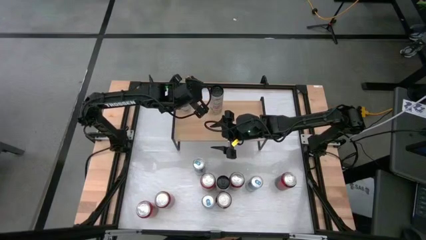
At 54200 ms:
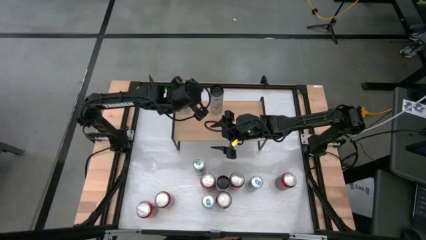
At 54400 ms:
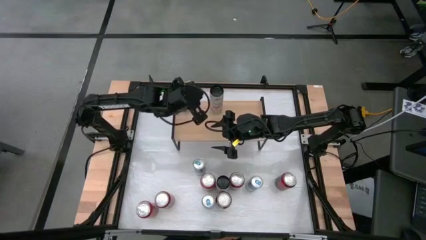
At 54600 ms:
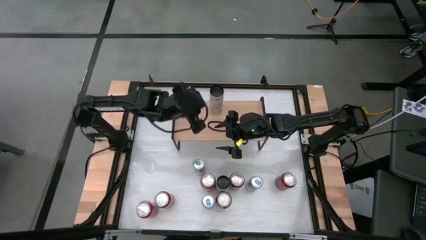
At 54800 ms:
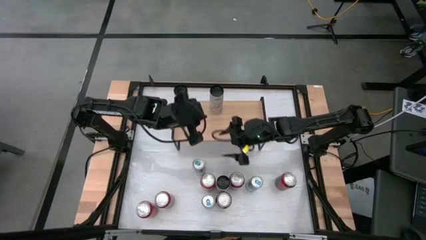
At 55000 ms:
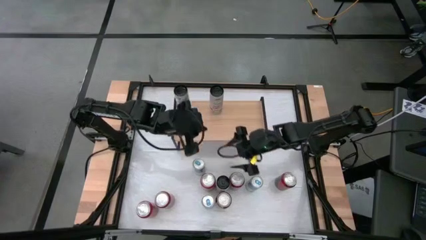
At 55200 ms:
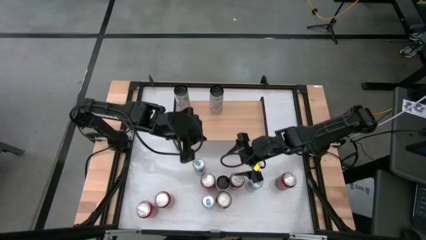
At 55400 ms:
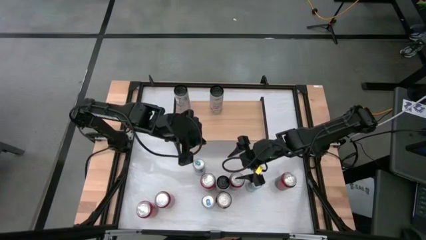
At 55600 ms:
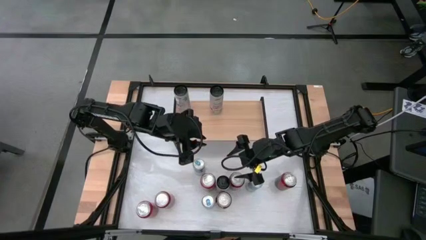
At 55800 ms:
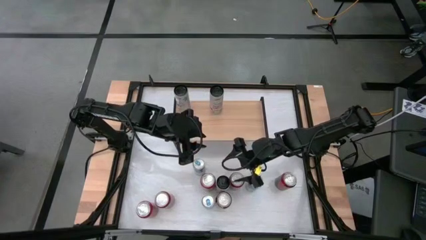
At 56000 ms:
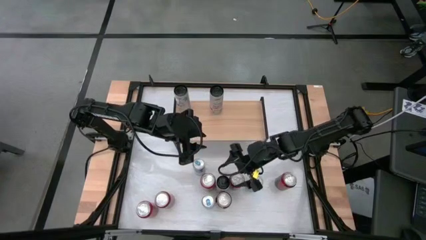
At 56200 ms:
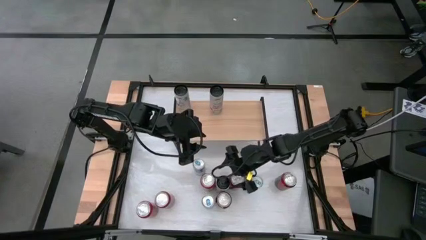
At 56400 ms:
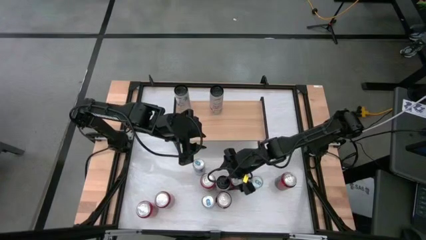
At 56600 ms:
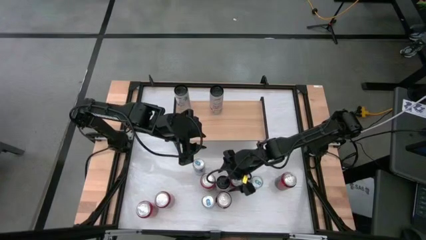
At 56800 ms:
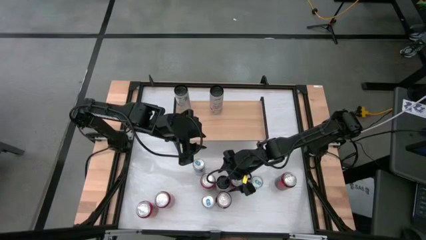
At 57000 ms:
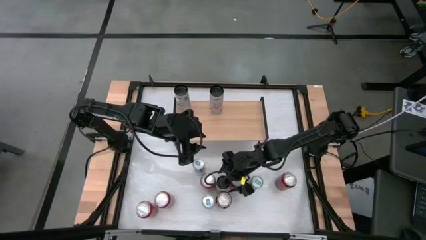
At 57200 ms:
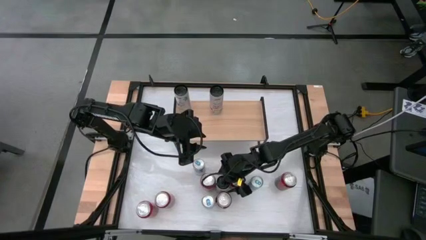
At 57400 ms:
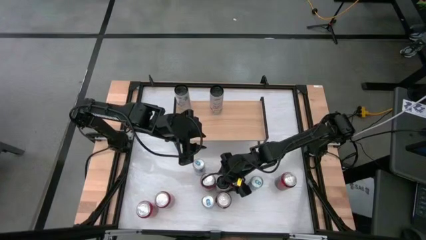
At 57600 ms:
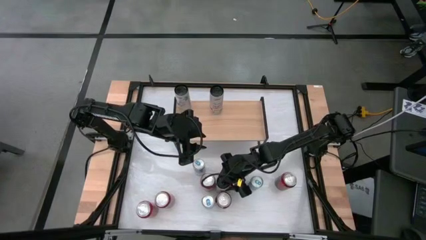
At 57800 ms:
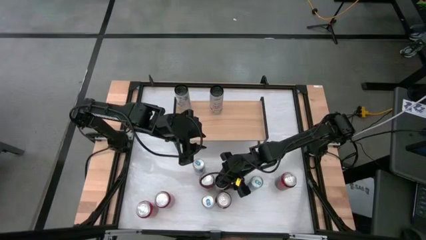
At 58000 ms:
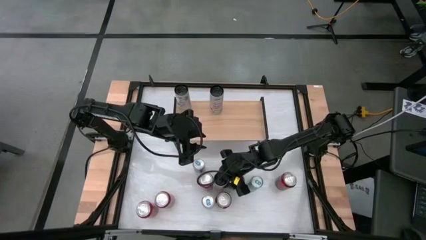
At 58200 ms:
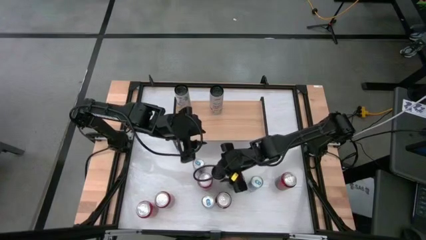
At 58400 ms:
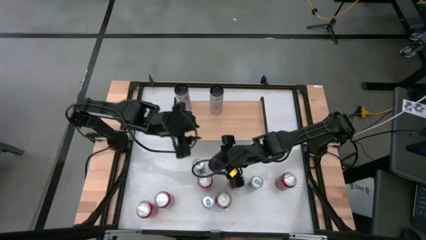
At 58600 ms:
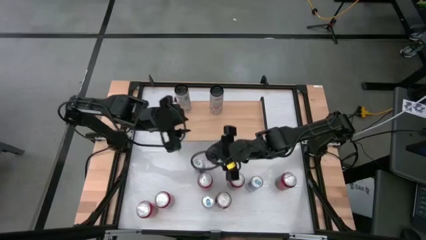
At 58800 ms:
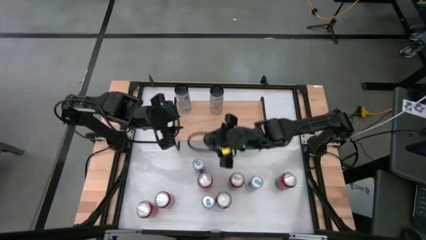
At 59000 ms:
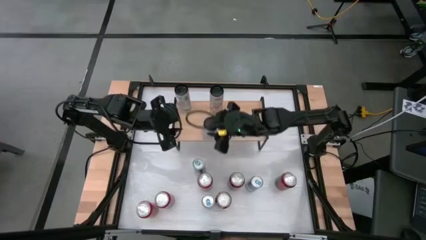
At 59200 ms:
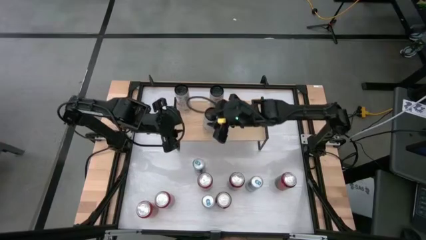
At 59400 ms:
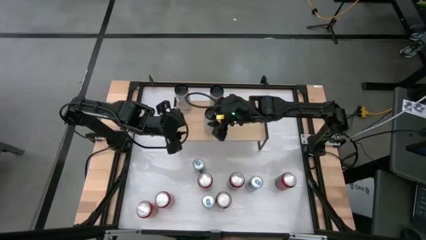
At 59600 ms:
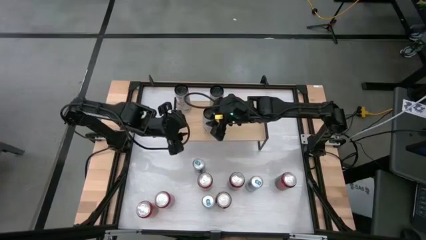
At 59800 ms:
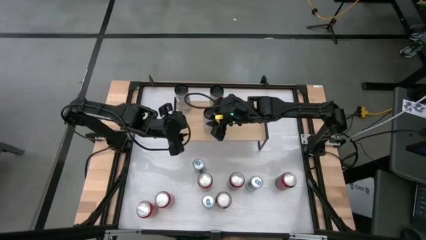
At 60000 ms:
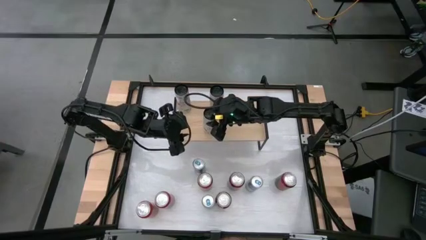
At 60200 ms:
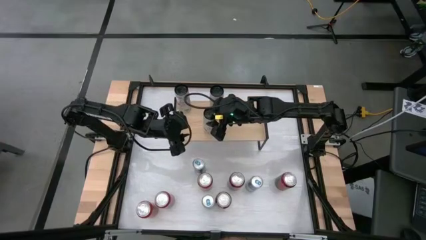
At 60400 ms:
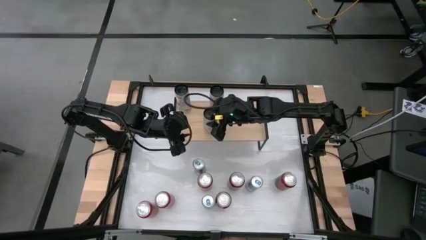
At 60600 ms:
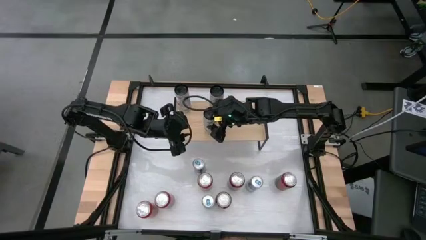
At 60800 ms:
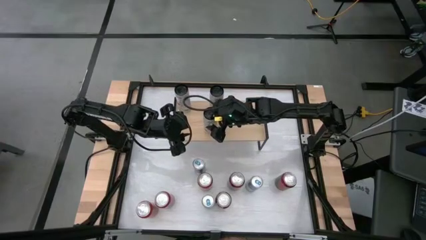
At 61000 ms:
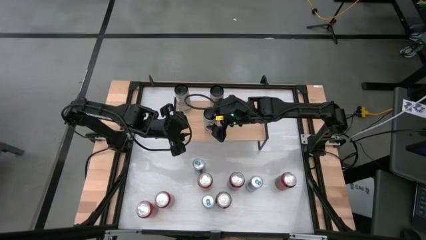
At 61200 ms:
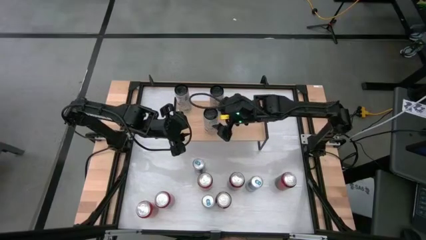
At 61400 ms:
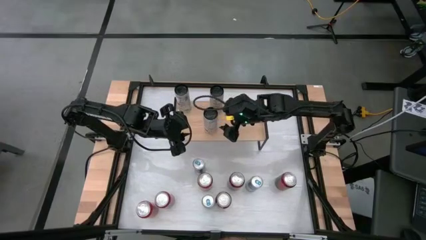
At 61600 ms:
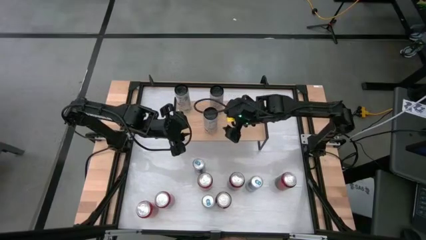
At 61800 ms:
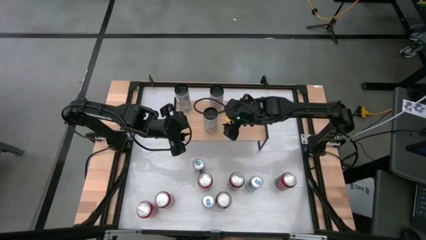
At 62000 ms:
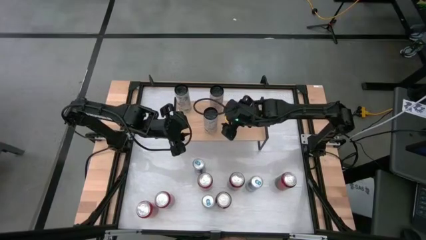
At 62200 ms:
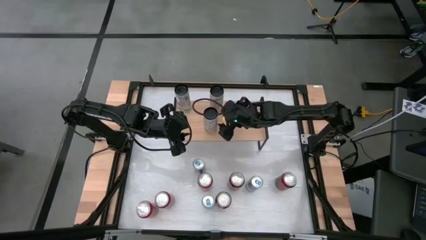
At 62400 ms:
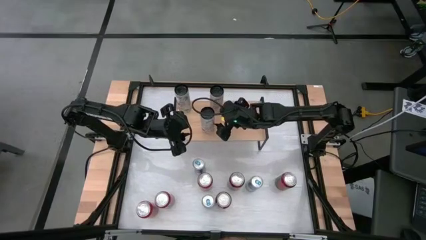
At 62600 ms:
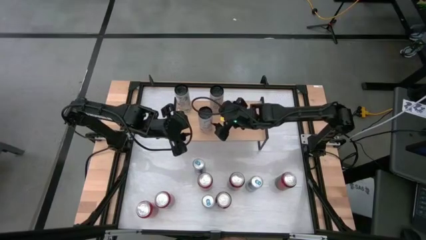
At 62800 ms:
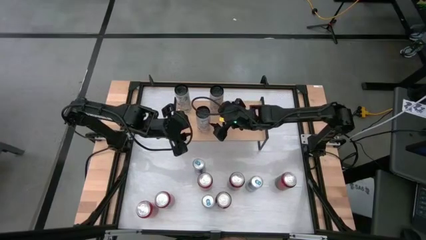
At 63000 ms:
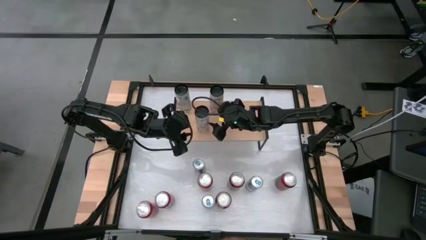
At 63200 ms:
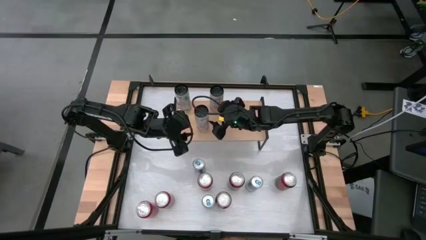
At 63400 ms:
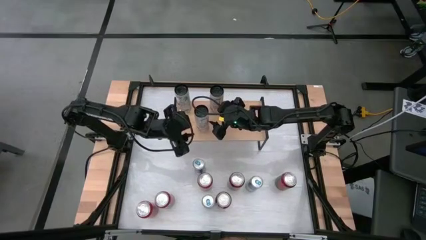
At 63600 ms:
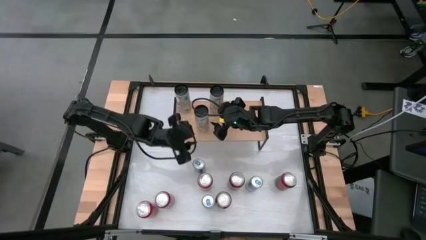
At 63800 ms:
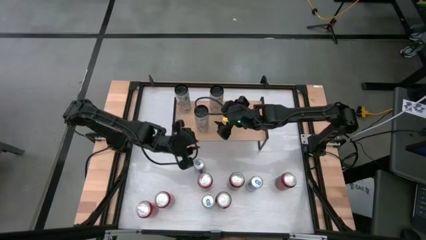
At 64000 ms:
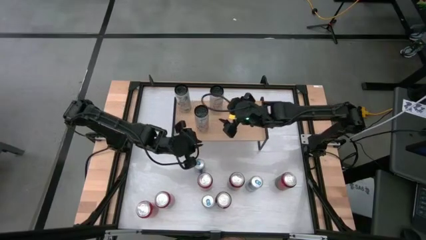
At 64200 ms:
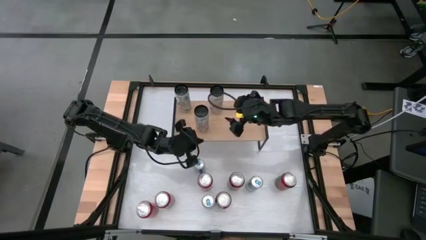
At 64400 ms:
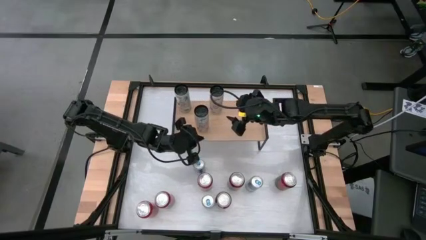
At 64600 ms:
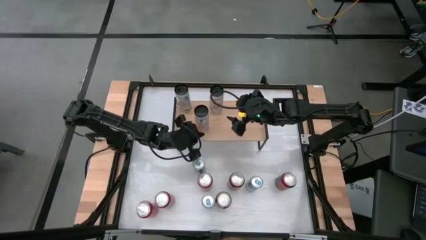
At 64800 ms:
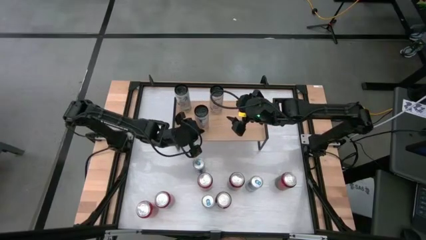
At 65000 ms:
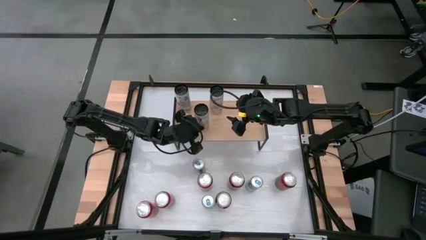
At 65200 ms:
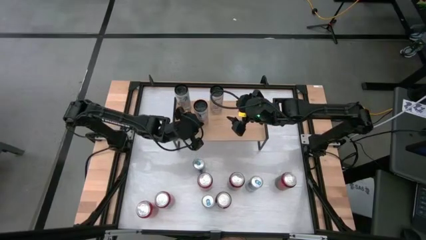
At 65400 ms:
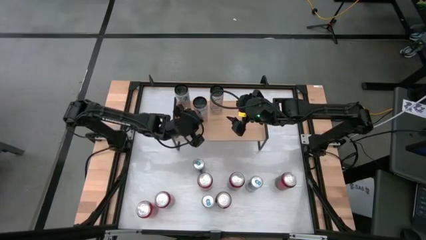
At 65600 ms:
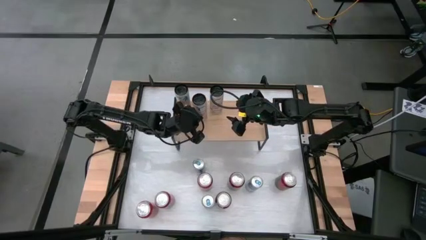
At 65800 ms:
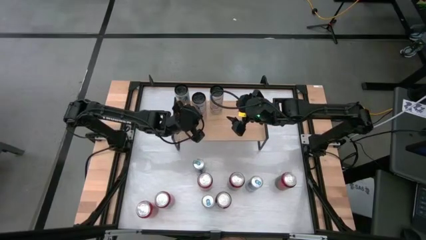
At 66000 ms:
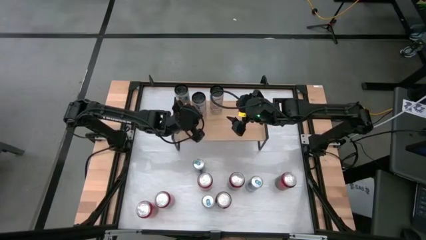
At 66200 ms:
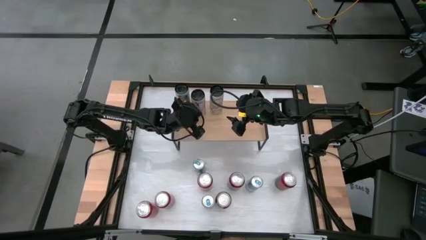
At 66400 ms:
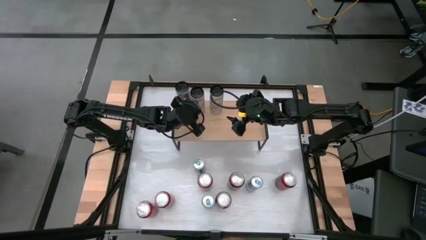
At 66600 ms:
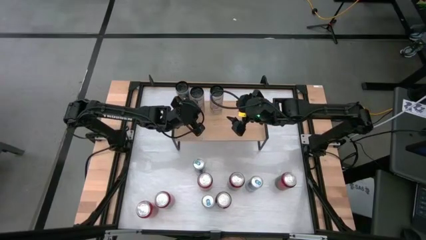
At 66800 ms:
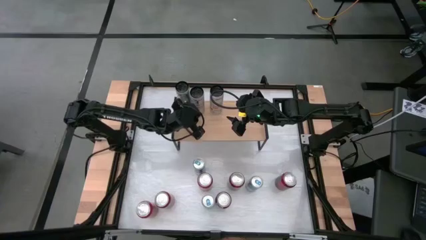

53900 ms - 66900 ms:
Task: Place canned beverage on shelf
Put the white soda can on the shelf

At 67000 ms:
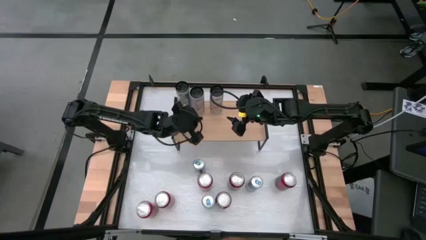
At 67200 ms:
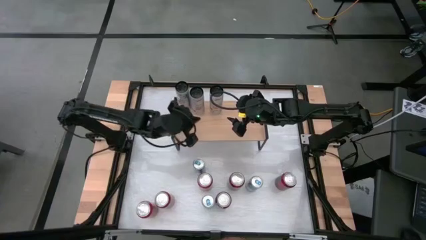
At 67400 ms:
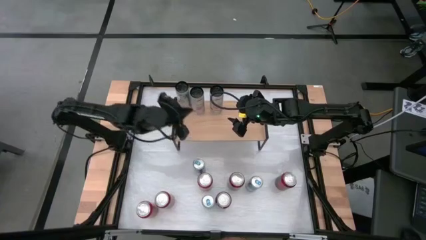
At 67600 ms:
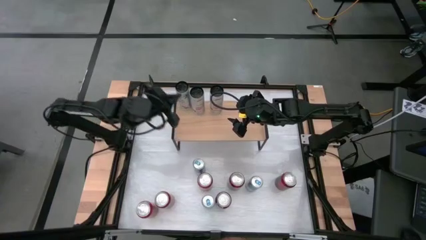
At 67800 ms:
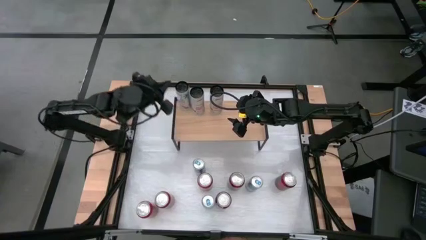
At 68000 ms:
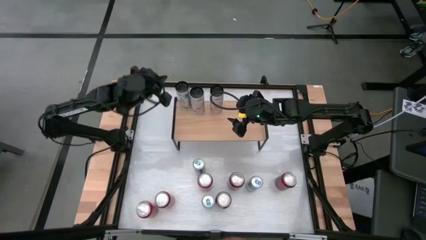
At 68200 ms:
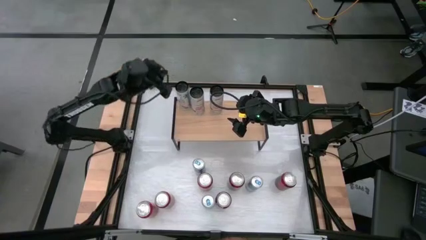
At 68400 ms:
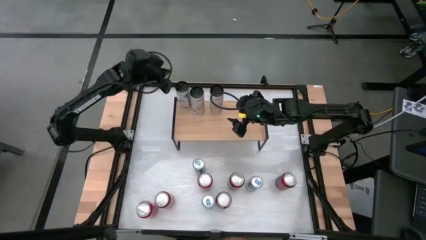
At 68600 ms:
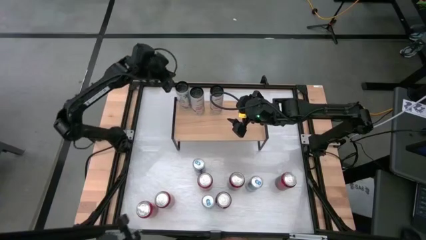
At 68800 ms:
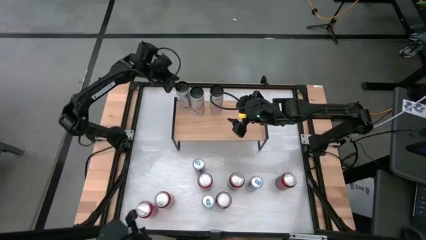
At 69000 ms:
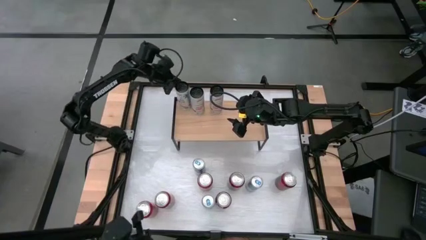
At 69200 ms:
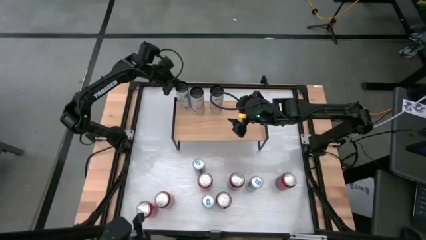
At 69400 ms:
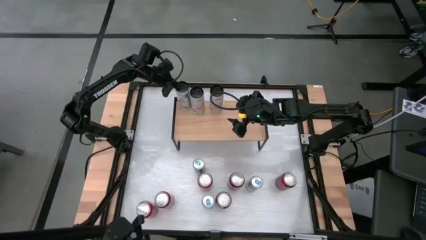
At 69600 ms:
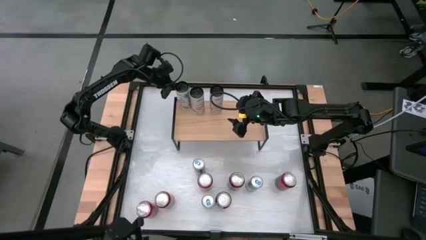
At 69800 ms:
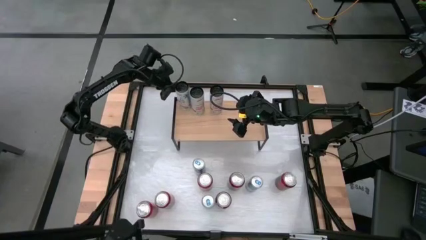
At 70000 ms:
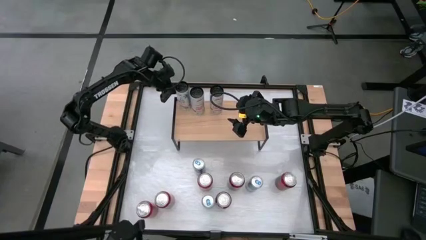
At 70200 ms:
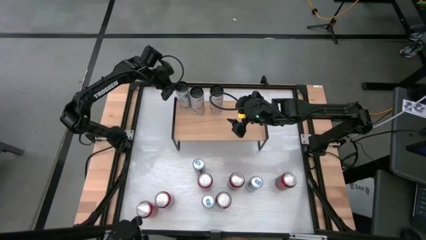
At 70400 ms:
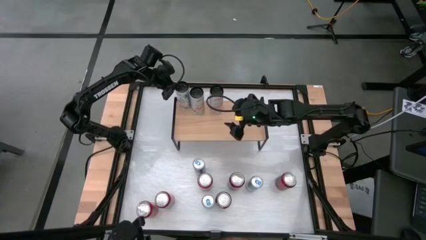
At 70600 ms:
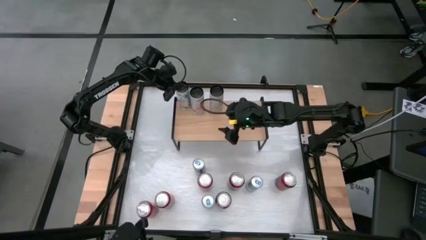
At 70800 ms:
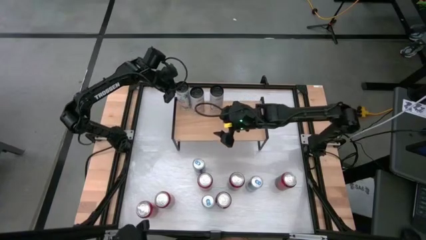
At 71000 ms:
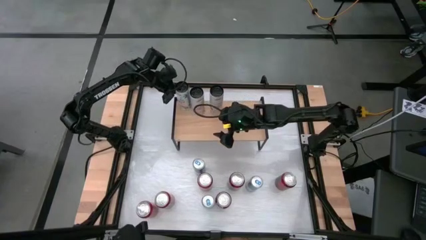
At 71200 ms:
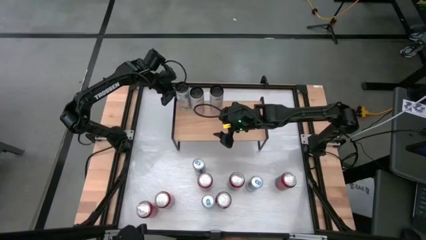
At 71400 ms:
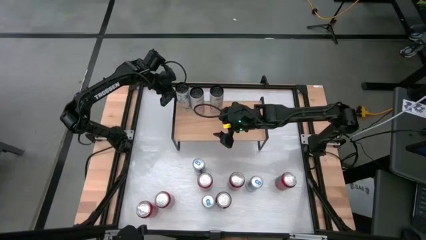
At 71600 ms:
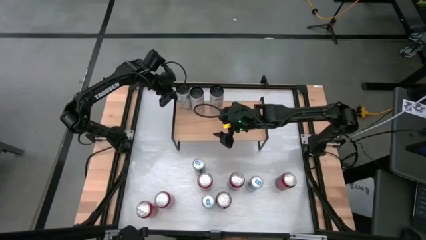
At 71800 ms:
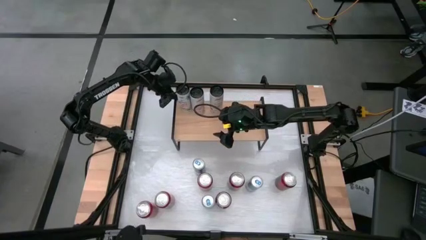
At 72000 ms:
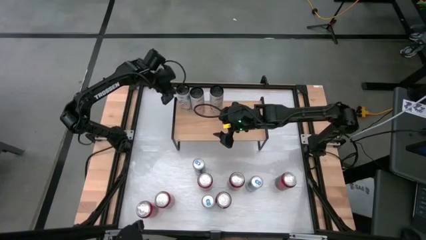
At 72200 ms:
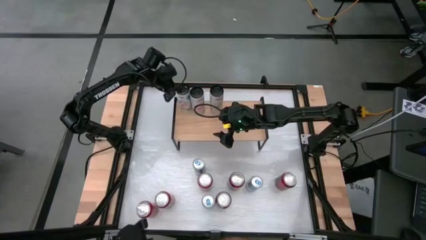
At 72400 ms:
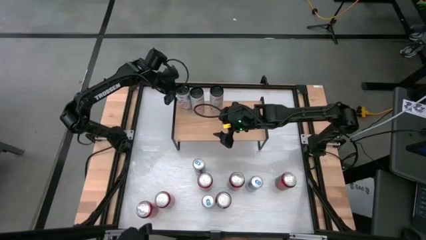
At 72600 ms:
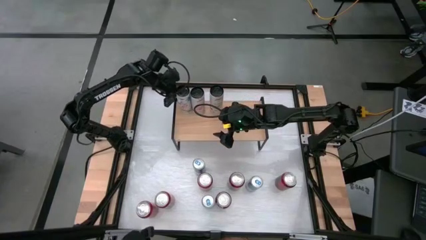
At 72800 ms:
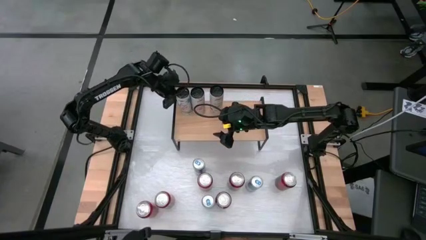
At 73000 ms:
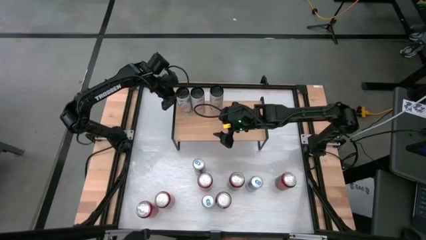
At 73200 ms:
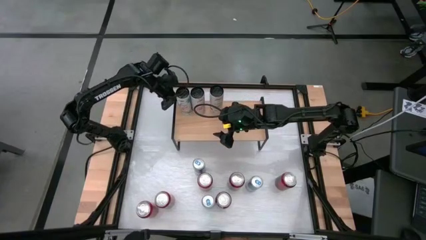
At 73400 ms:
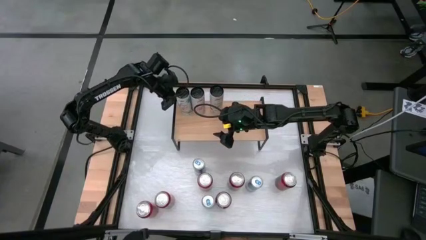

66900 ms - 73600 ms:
Adjust the left white soda can on the shelf
